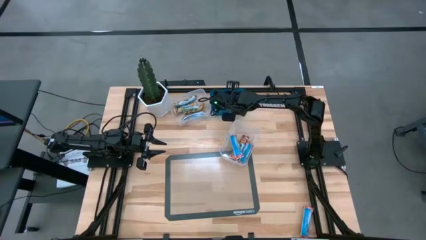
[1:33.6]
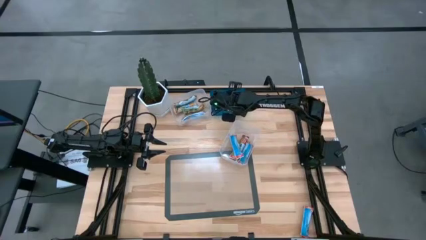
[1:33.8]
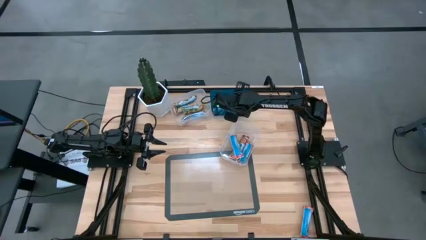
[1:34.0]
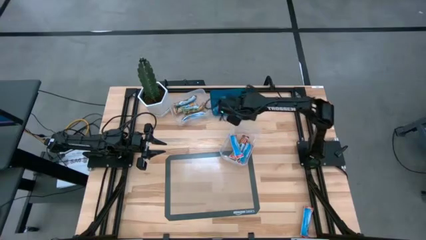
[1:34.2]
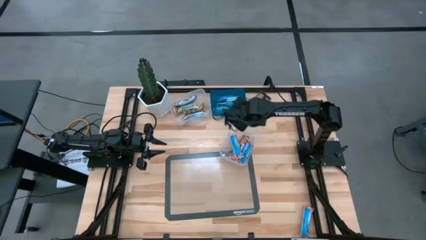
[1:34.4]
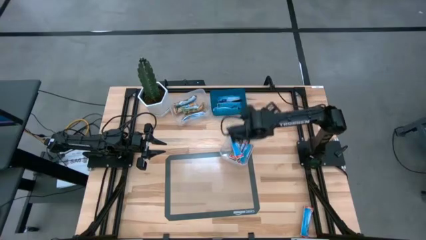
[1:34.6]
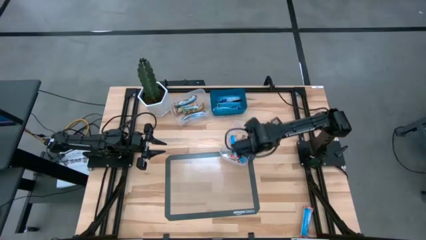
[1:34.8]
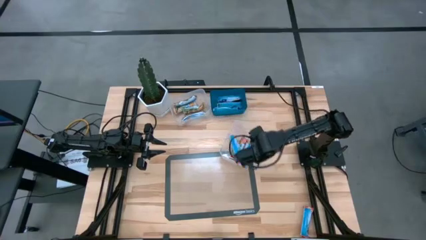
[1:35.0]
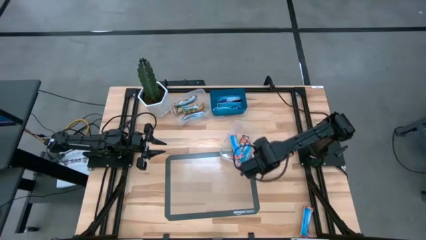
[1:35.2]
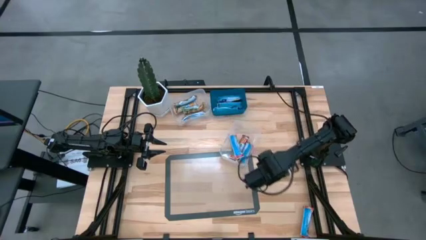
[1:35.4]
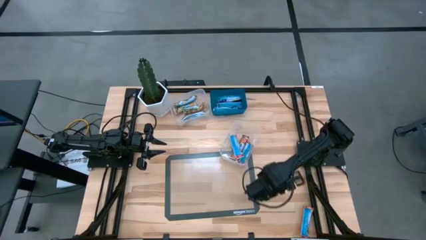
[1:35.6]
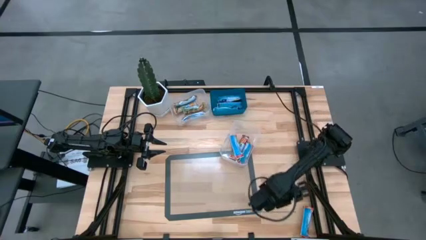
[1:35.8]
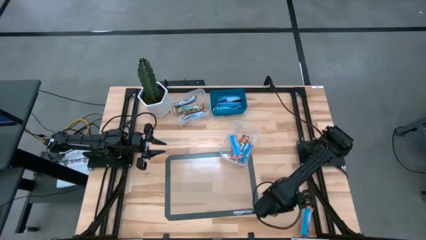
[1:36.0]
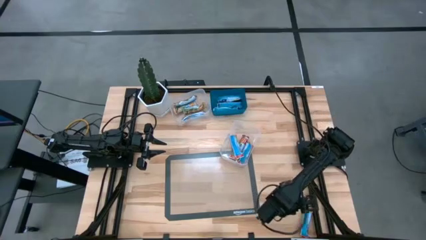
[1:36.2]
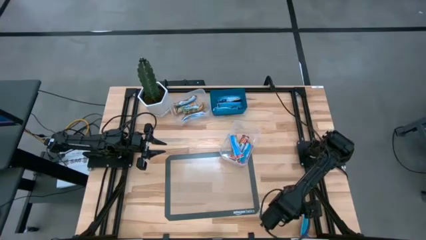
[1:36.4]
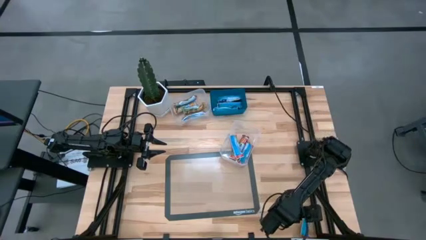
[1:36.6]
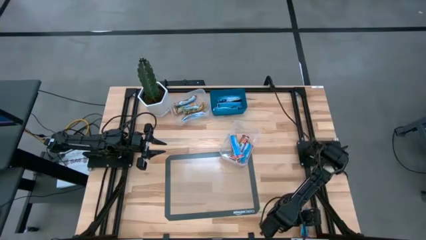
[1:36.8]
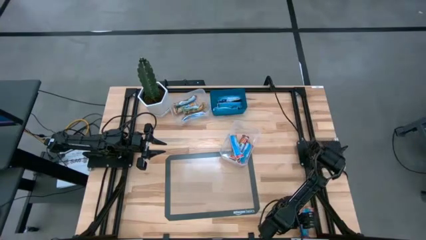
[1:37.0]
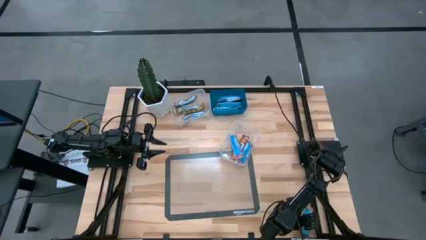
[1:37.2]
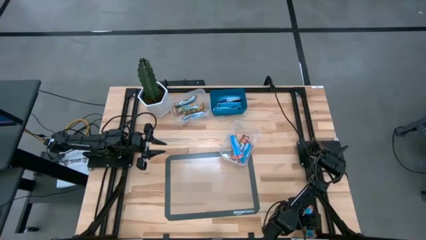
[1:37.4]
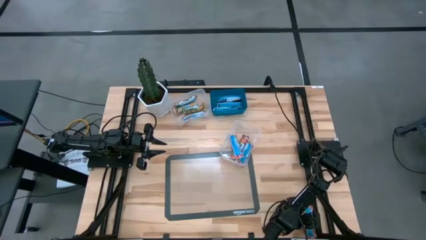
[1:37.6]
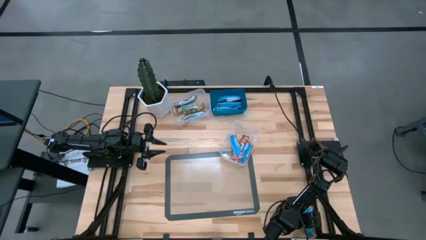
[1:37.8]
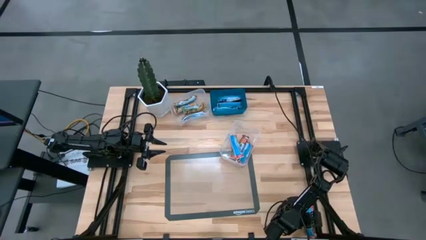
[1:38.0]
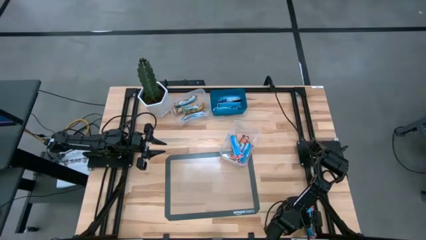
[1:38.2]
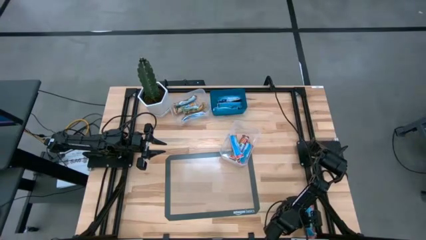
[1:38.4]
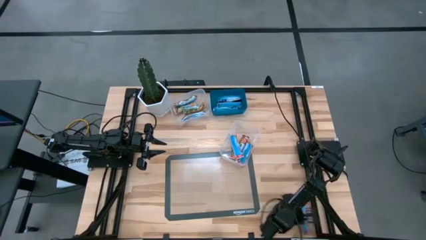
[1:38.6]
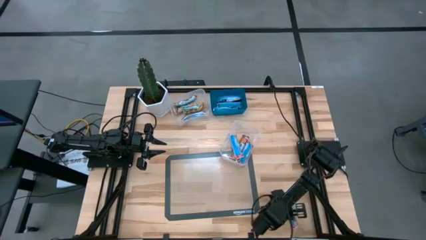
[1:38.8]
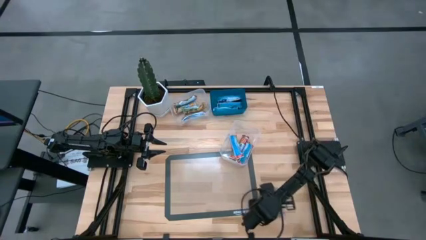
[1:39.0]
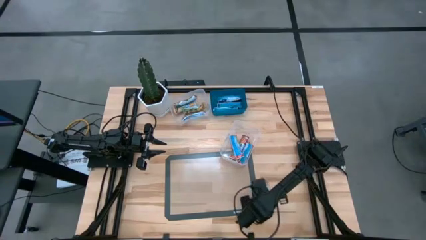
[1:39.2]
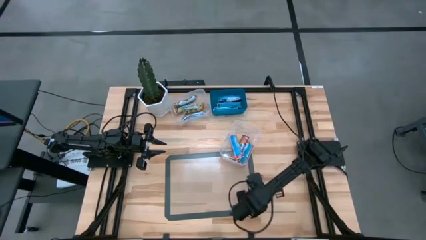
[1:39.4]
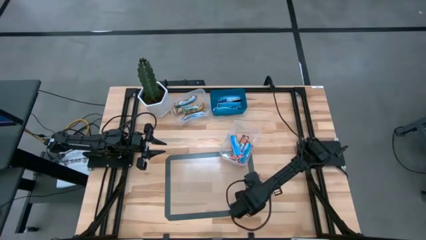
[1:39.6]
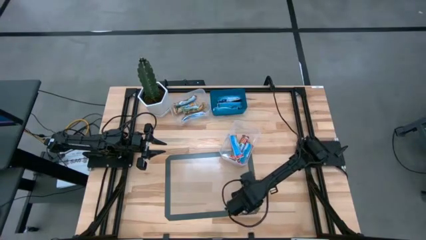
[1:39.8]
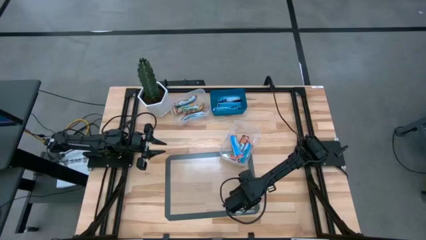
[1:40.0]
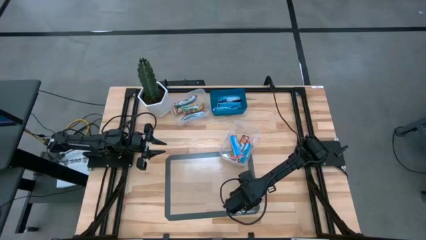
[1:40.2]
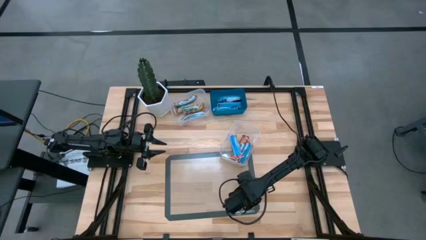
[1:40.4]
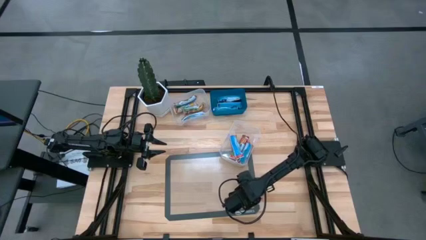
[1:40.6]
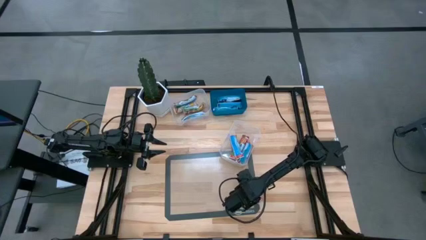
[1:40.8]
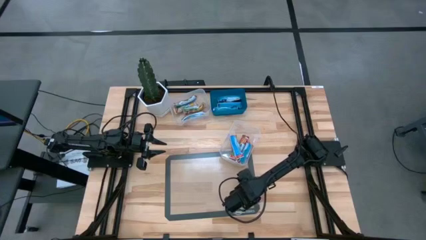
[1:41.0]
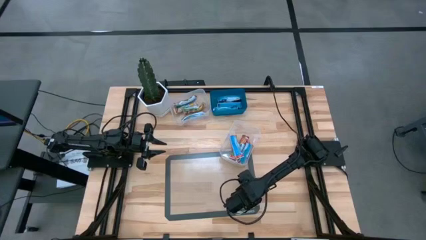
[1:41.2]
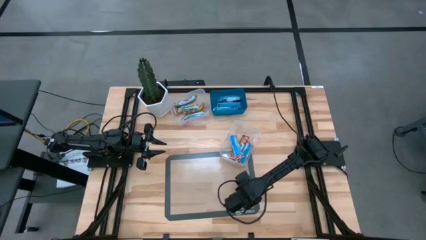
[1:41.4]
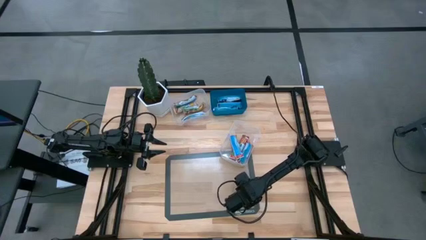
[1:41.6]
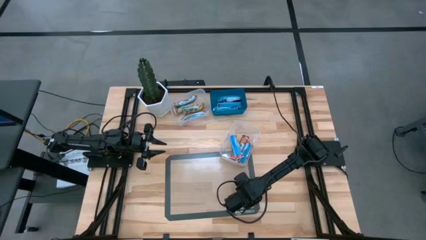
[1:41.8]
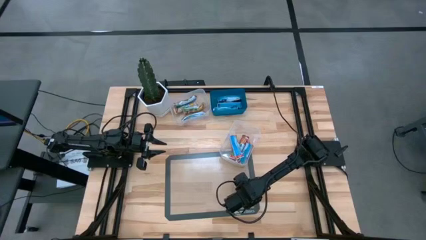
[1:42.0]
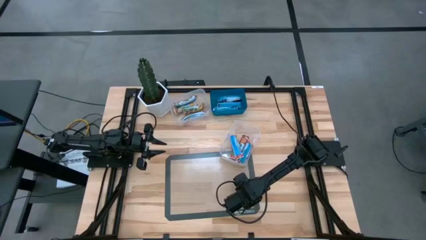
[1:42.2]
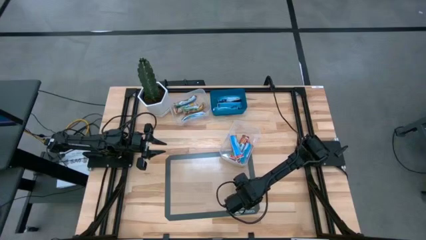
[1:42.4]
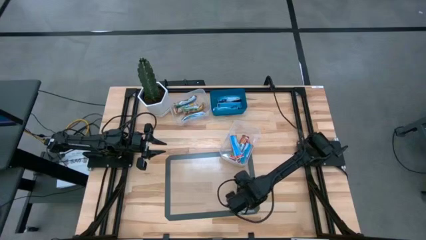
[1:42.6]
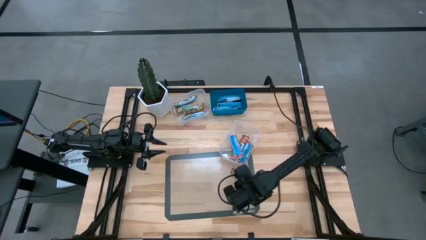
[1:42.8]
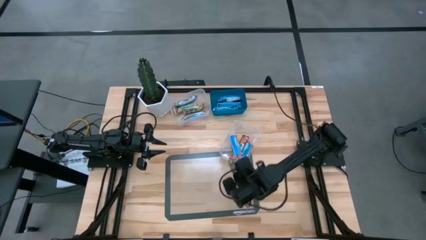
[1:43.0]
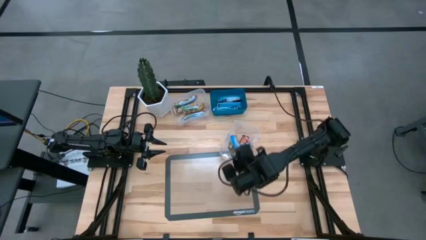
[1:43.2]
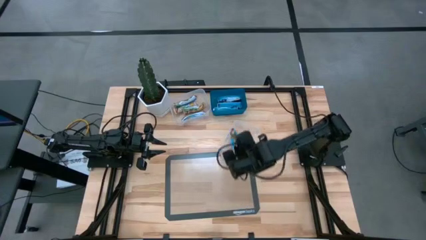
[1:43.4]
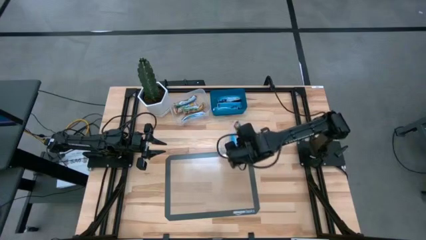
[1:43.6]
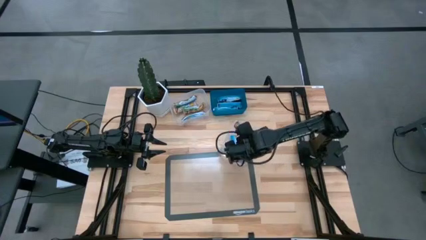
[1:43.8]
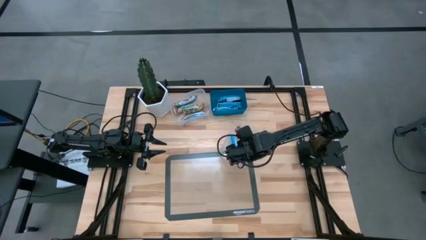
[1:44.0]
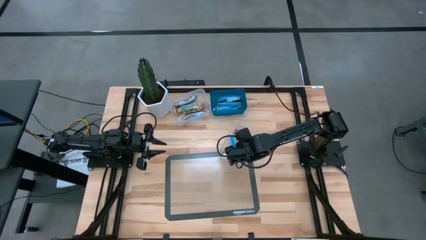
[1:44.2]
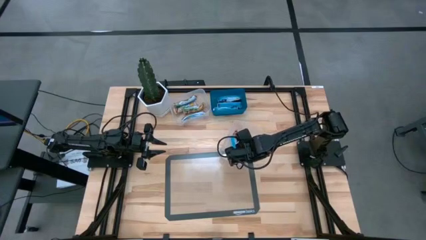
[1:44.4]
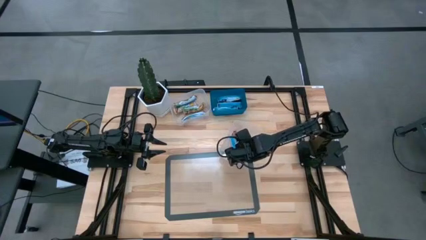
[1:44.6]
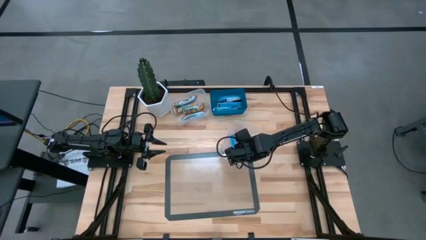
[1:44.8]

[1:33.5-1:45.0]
Task: Pick and place Granola Bars by type
Put the red granola bar into the bottom transparent bin

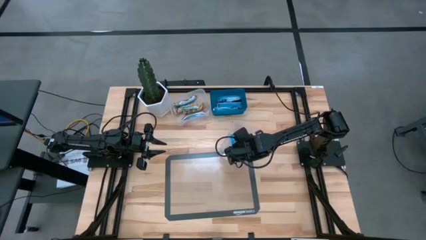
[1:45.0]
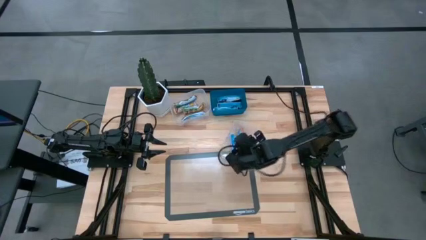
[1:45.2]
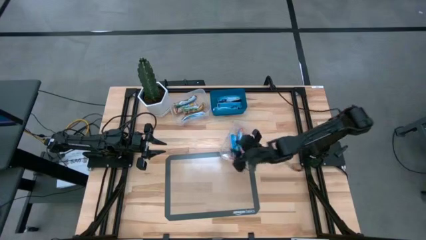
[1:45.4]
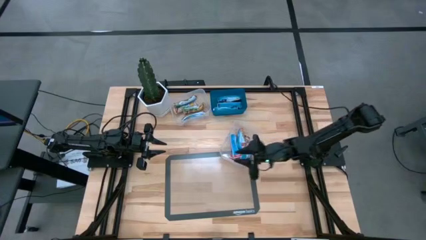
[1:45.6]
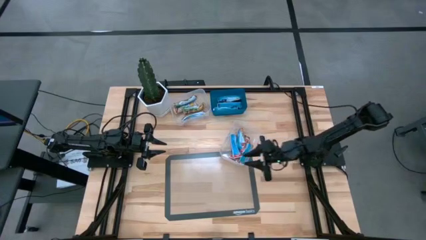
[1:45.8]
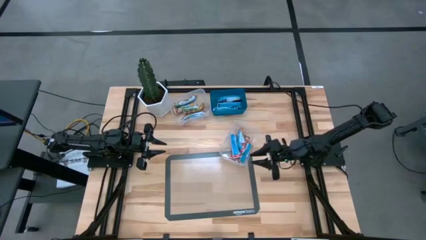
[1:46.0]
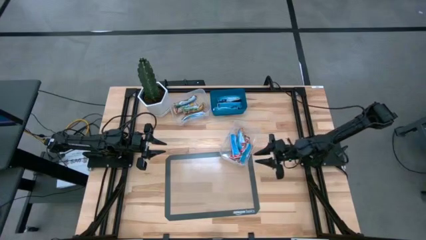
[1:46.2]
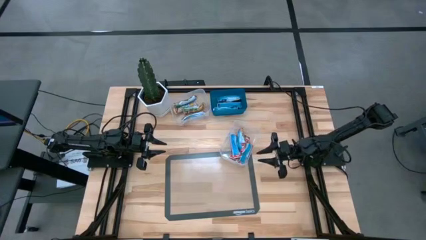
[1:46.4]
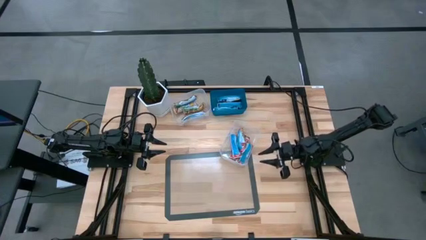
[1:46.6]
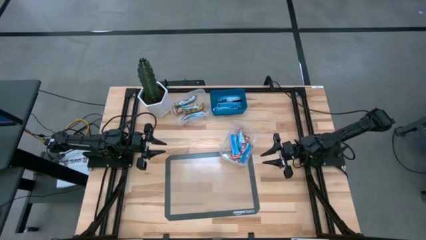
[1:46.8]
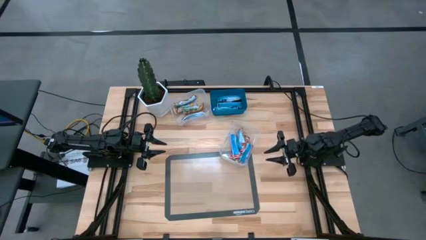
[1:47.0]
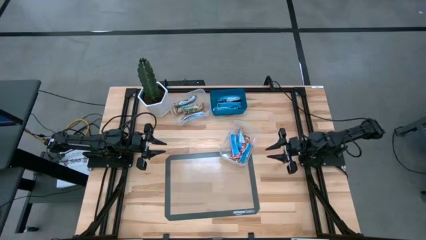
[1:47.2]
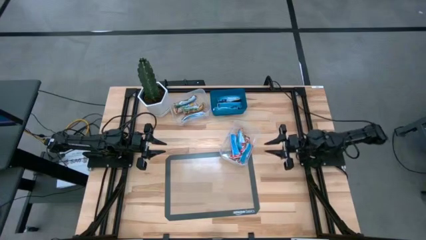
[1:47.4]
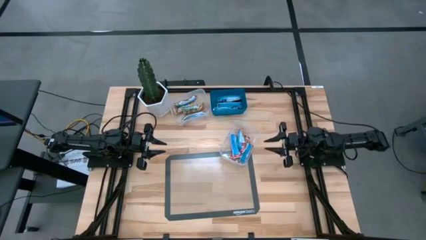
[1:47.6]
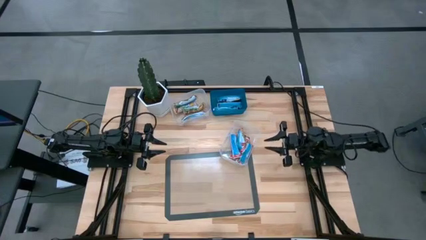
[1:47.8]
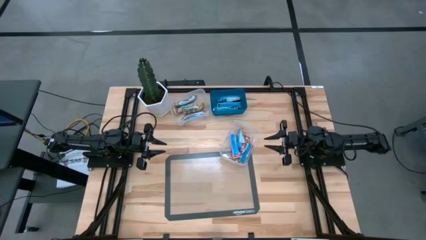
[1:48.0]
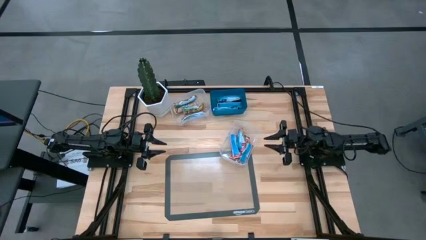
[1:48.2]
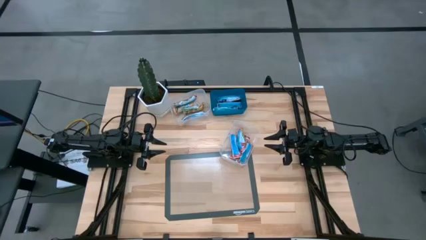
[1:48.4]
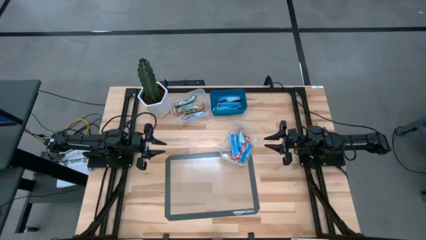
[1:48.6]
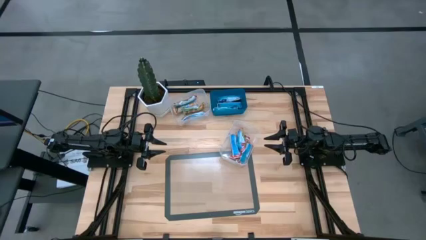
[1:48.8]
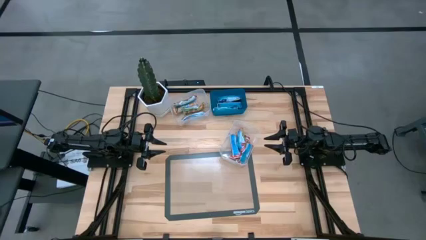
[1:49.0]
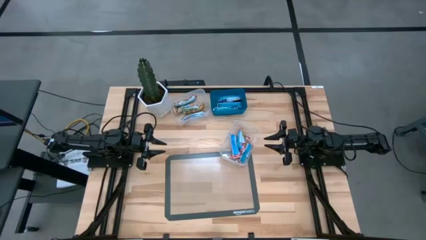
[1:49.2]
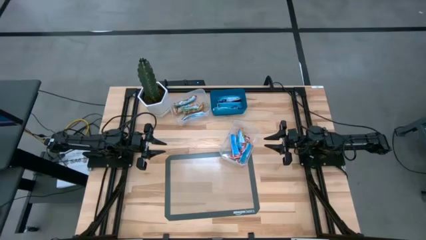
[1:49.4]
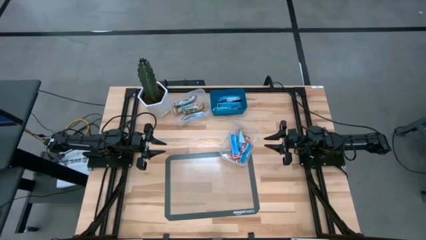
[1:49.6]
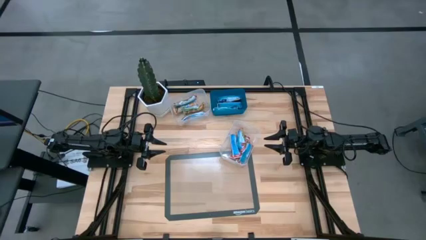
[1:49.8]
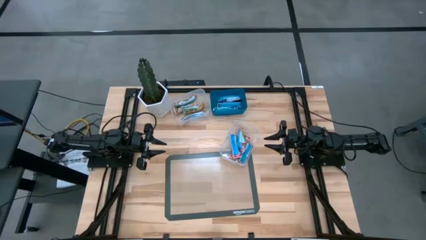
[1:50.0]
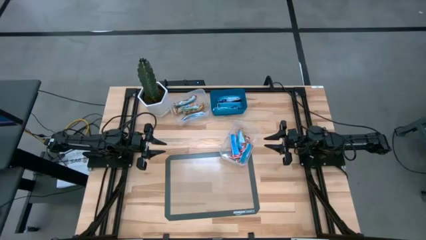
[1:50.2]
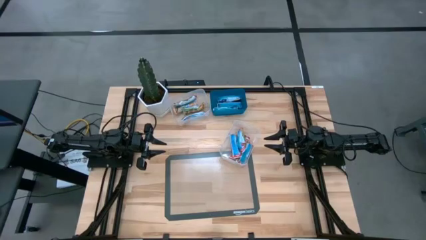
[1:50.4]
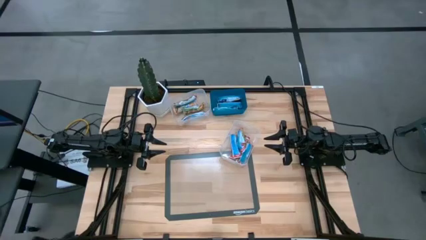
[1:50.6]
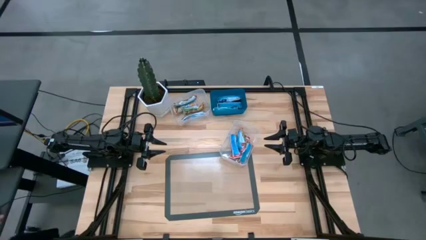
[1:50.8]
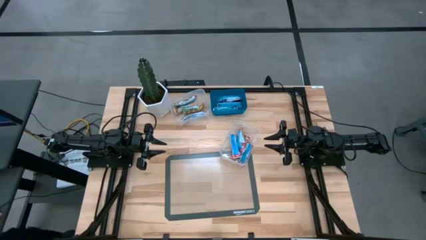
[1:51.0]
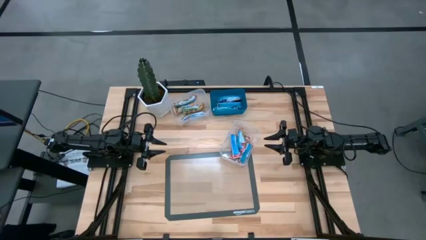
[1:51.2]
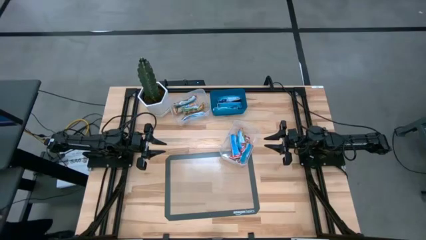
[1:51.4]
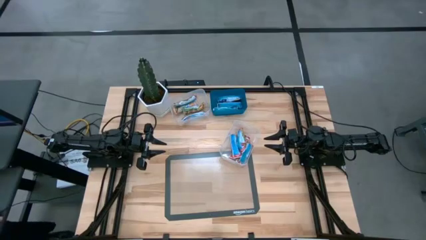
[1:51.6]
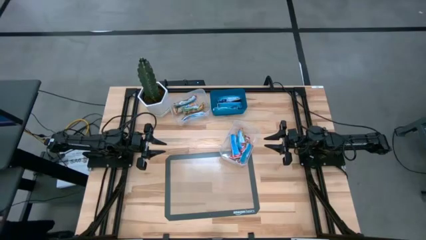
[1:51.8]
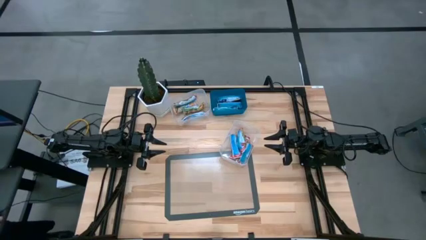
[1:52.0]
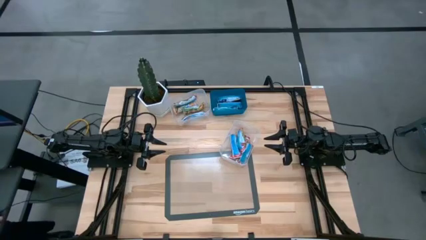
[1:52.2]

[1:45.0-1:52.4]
Return to Home Position
